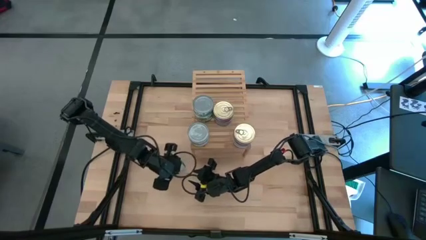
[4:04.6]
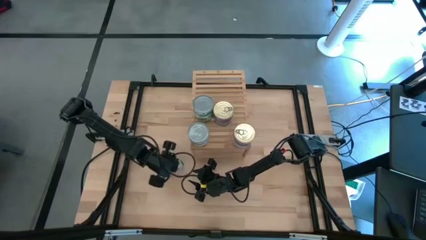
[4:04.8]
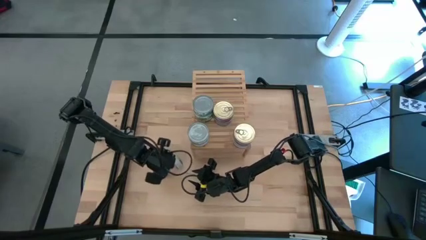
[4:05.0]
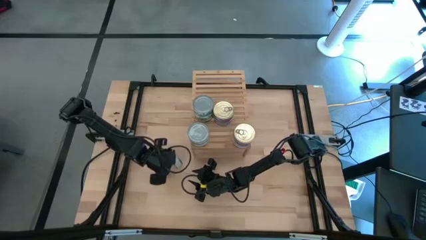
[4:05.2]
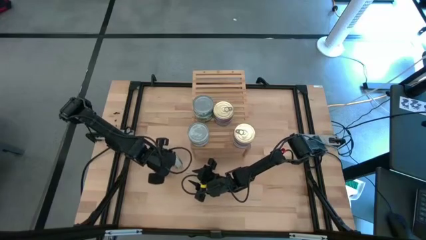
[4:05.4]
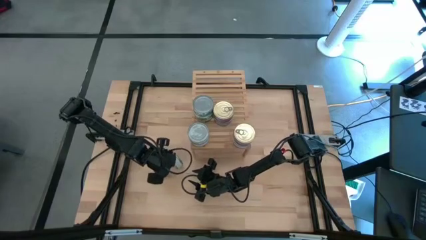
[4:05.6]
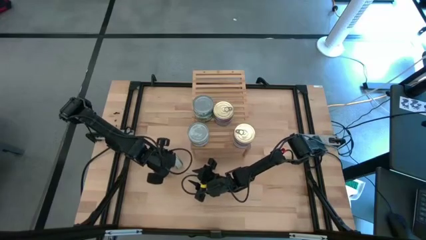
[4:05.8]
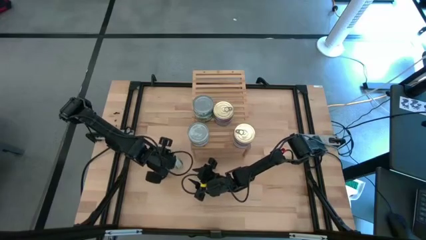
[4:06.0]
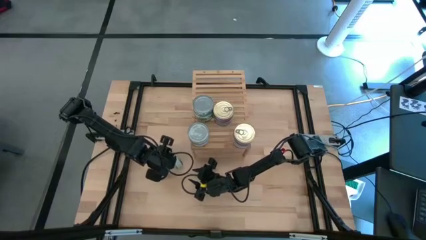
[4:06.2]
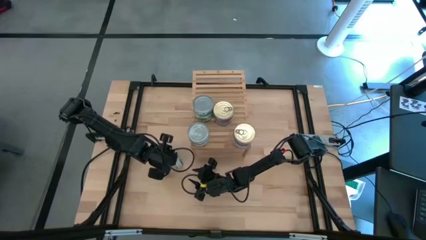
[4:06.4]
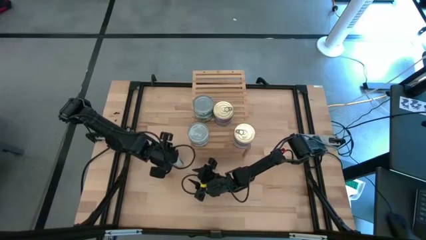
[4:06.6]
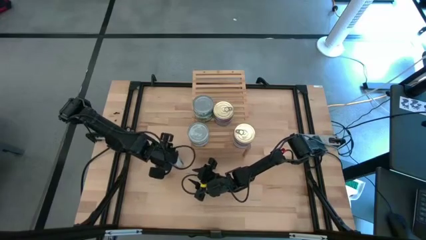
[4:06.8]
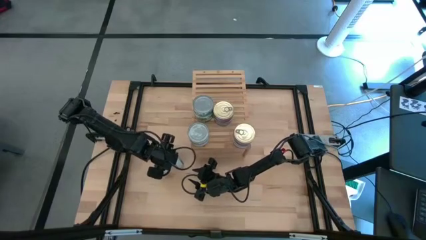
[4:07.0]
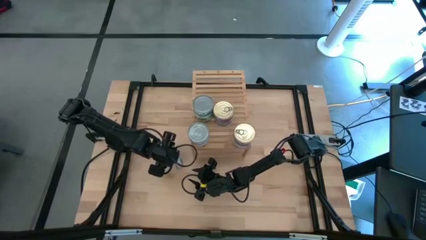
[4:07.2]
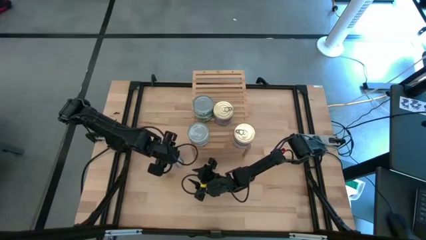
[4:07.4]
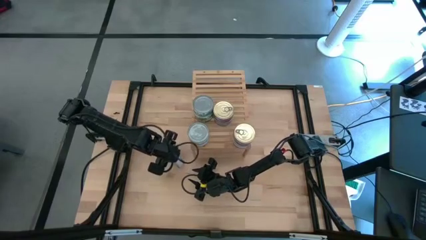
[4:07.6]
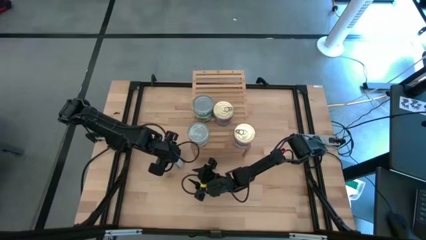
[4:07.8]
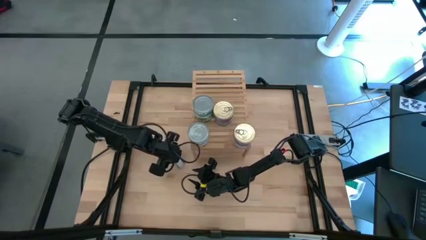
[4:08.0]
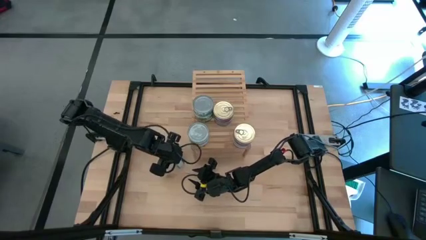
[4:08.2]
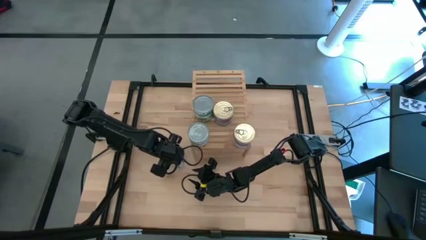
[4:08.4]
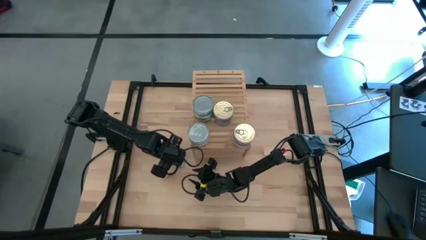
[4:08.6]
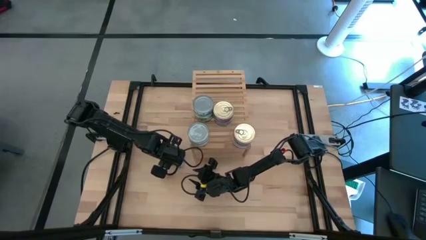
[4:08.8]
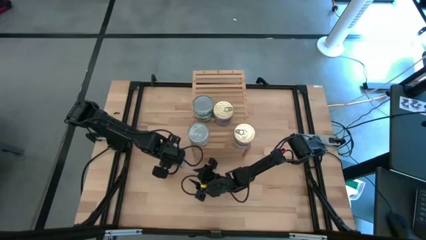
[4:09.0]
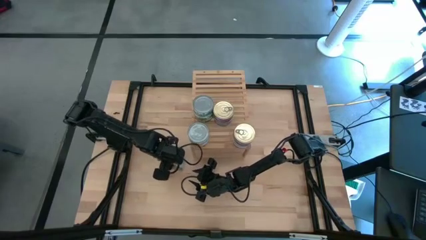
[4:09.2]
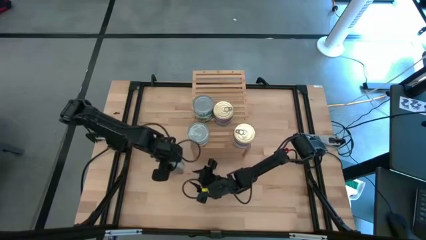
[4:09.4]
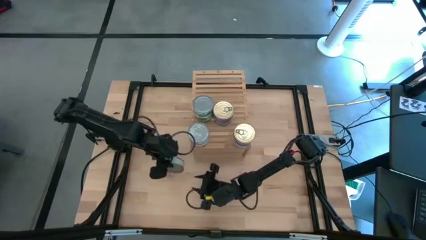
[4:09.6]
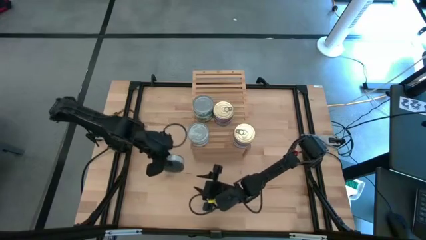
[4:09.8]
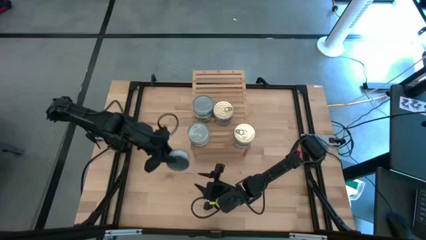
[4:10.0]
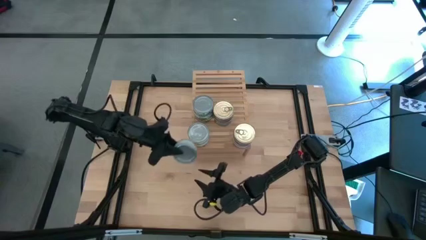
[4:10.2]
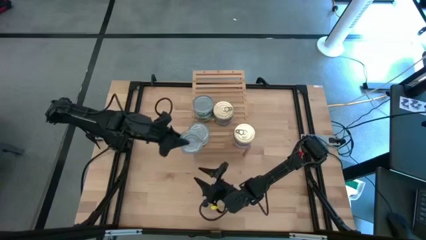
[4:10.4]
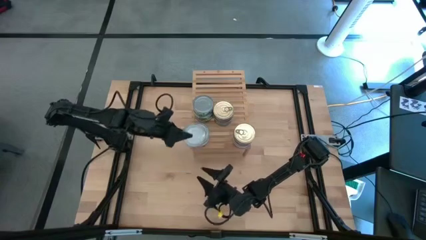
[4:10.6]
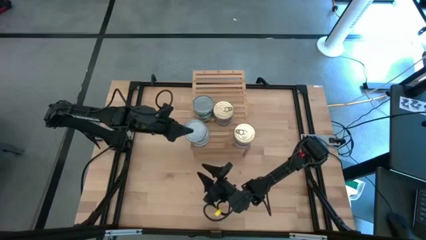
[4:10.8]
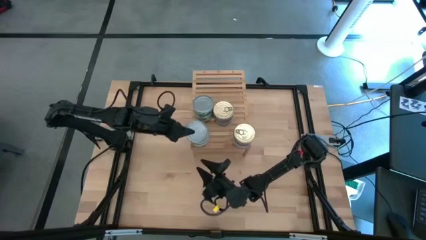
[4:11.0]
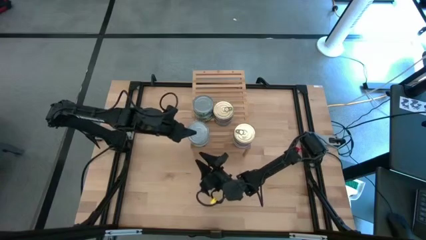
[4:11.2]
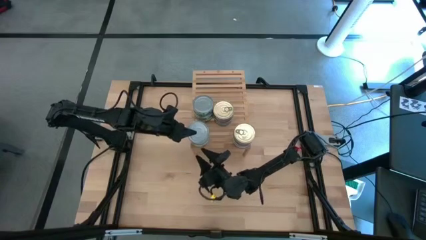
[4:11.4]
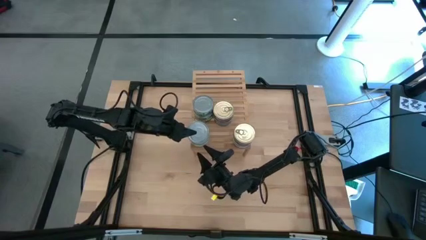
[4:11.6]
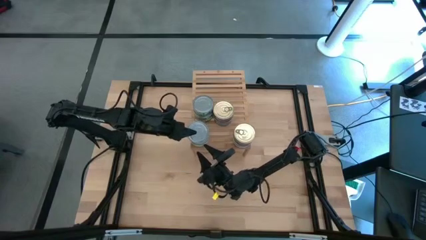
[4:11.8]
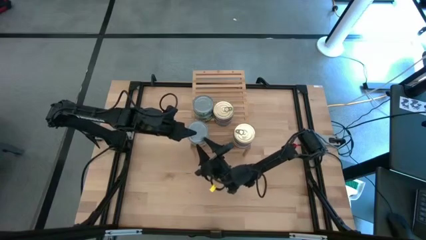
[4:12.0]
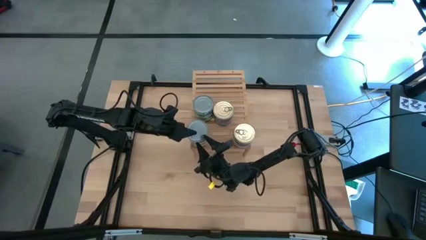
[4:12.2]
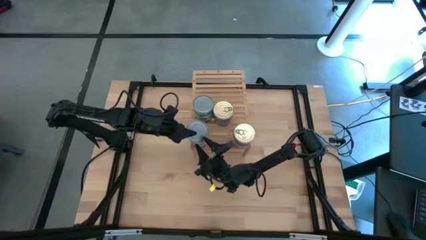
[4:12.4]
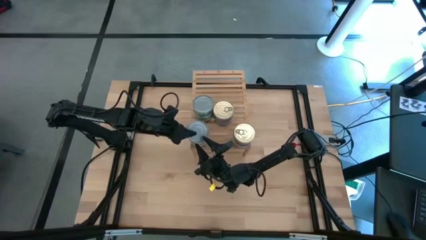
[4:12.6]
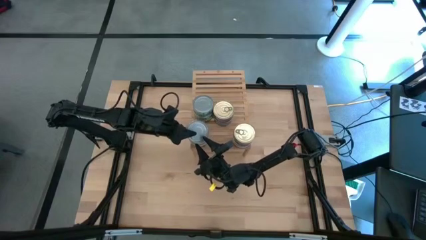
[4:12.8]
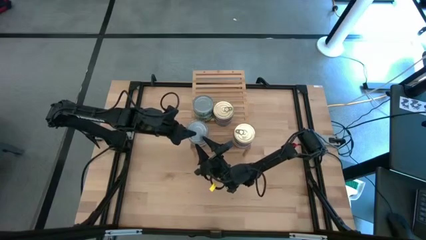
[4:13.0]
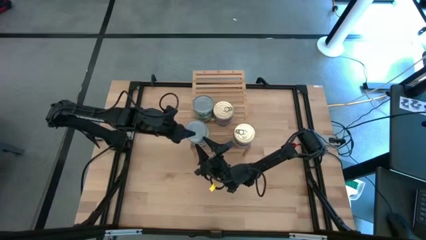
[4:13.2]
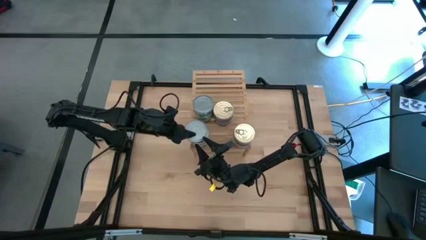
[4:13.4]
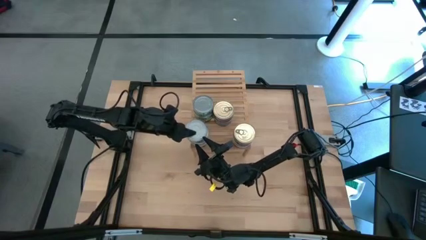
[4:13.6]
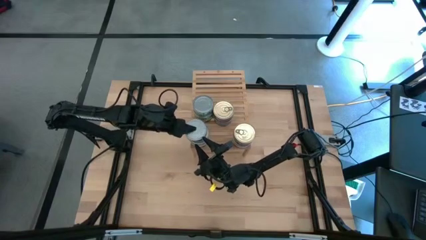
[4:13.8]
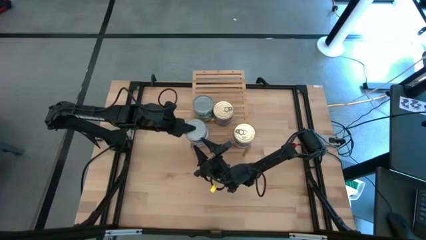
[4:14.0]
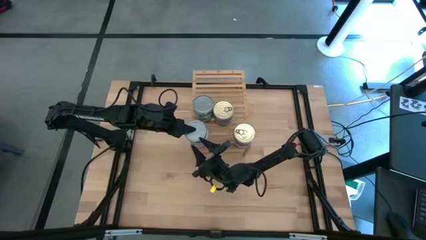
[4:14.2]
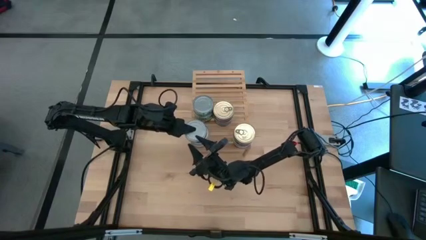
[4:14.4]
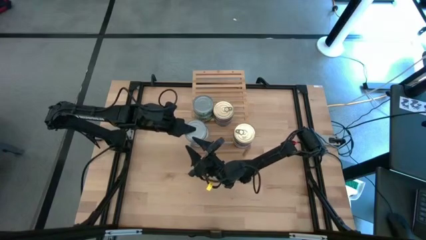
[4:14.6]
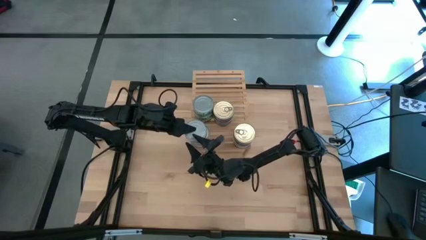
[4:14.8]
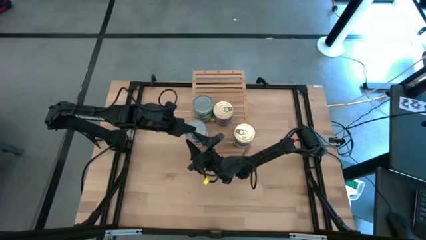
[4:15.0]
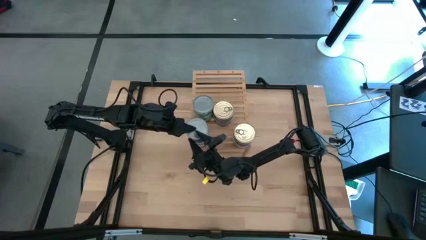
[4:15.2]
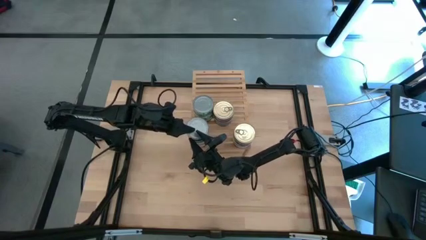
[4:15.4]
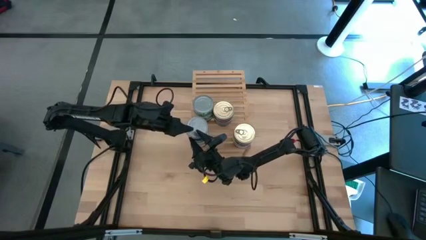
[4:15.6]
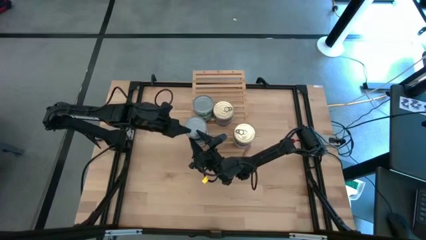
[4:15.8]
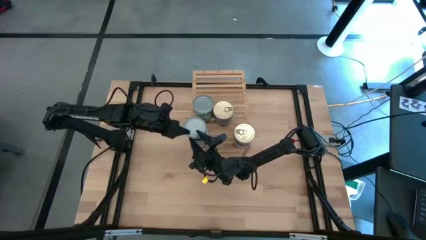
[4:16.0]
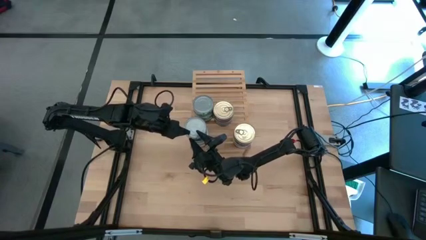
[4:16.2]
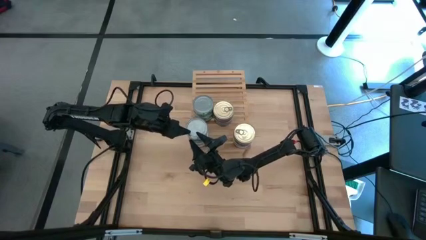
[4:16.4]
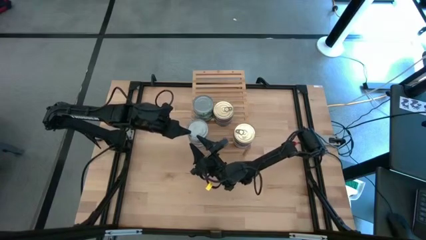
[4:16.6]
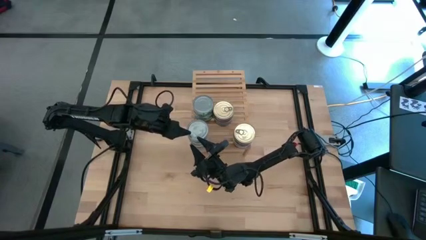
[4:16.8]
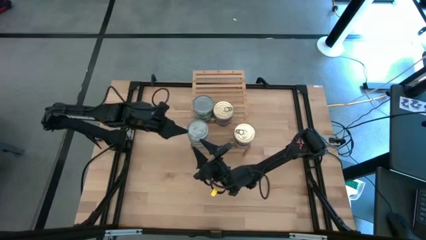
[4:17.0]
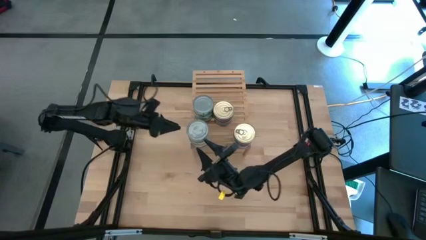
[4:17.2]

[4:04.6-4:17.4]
Task: Stack canned seafood by type on shelf
Stack the green tuna can on top of the green tuna can on the shelf

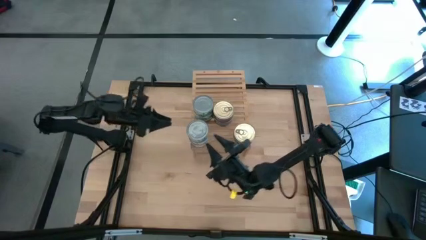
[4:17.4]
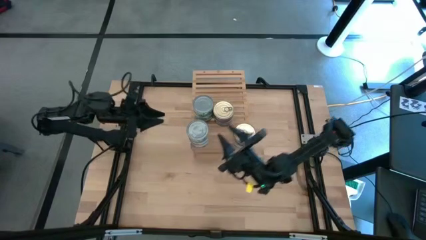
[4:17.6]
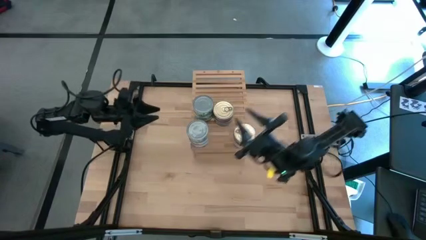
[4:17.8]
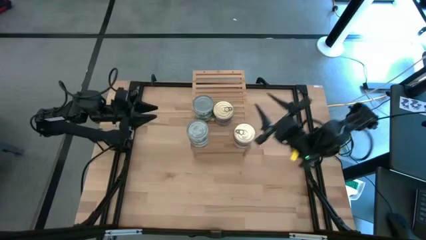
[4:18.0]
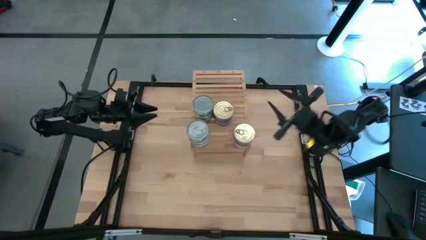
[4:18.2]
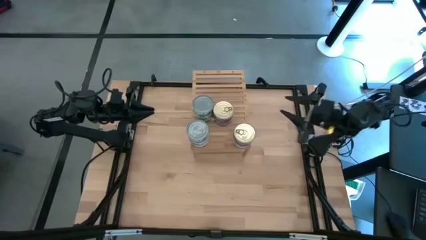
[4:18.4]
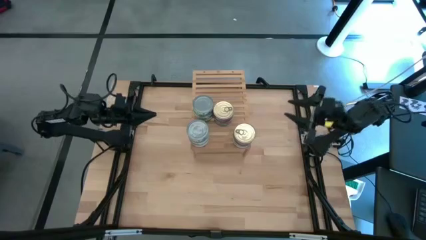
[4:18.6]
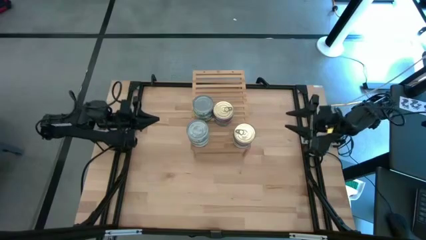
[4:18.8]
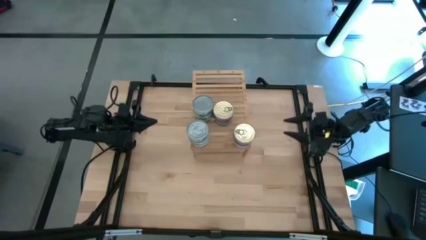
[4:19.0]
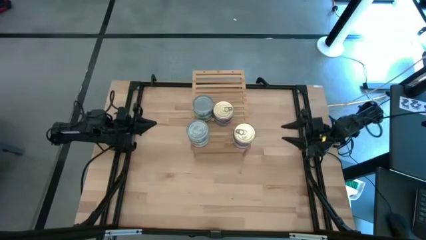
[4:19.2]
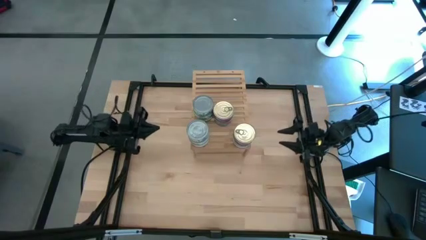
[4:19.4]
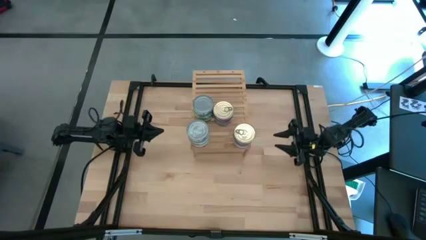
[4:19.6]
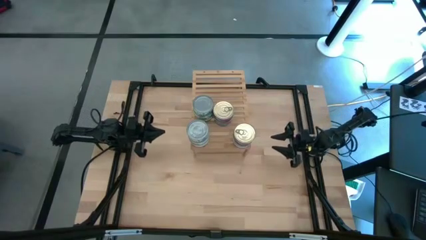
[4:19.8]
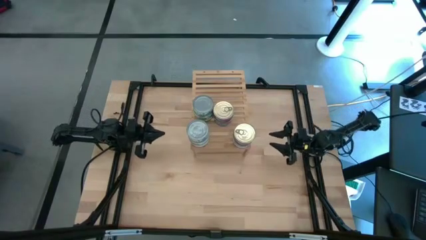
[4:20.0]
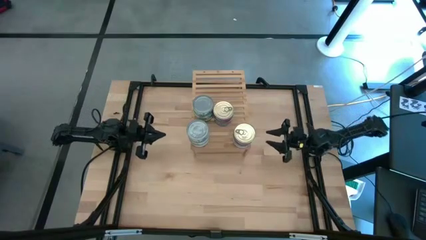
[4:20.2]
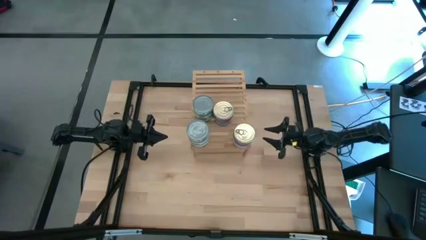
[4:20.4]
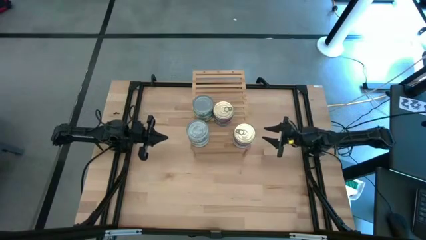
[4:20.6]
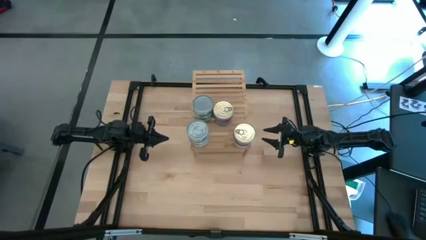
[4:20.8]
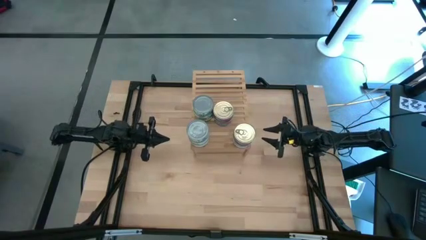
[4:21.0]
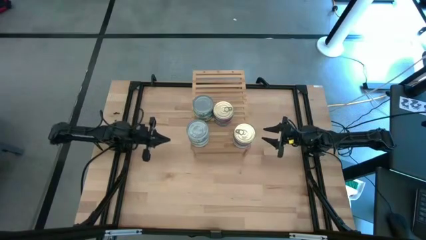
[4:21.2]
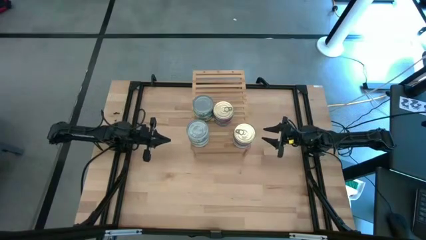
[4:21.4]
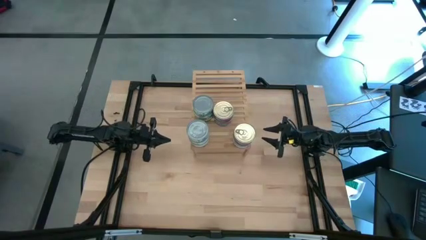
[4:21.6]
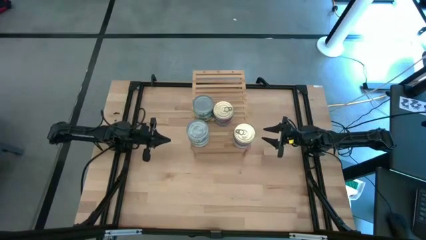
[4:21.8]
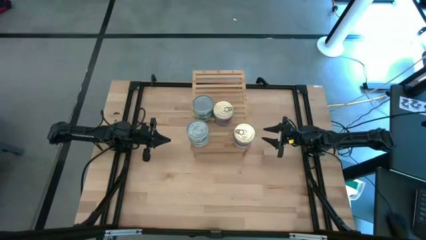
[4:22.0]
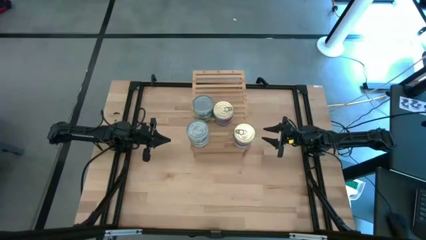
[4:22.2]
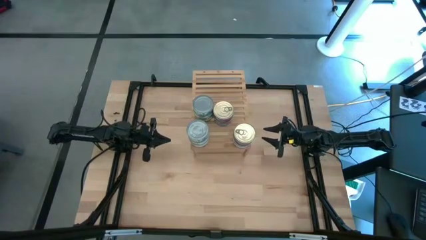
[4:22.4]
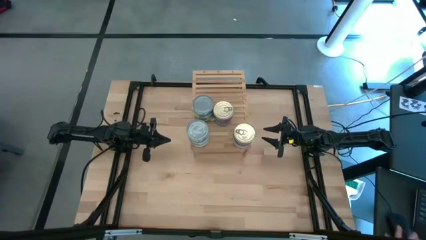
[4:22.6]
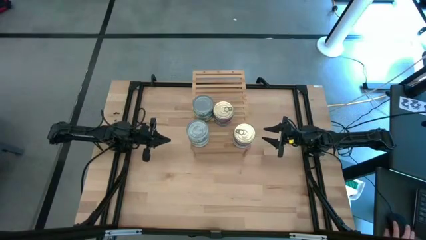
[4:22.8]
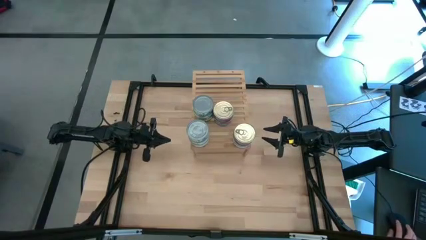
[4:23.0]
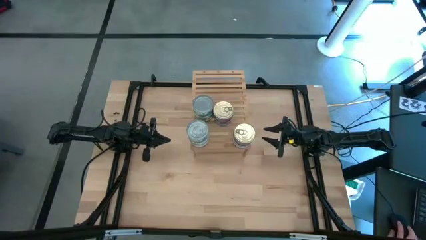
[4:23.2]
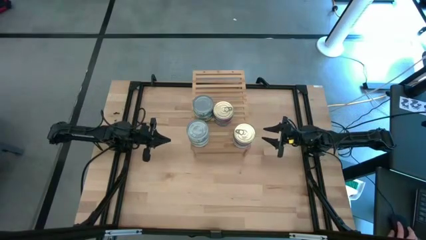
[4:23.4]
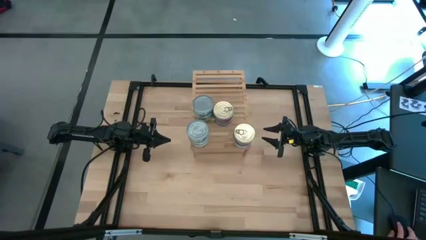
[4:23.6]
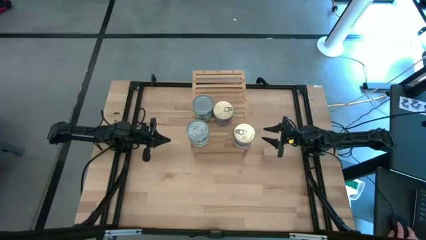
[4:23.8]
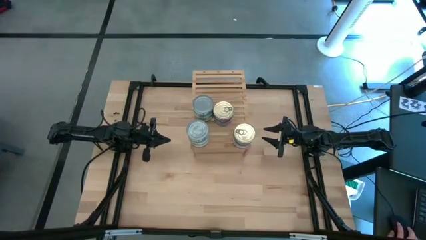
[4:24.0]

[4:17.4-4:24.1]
Return to home position
